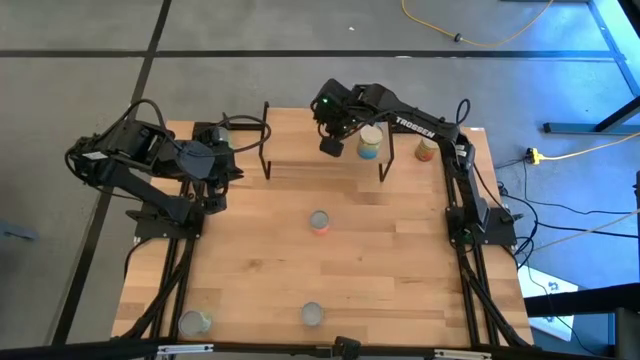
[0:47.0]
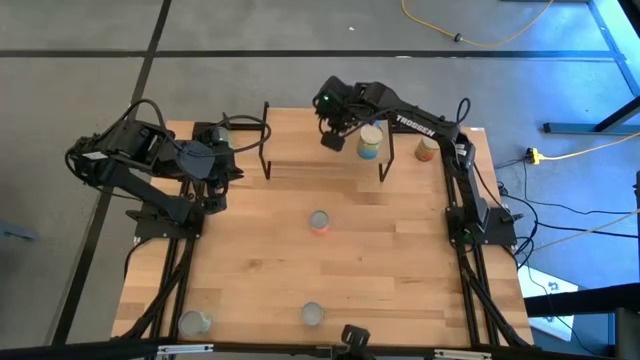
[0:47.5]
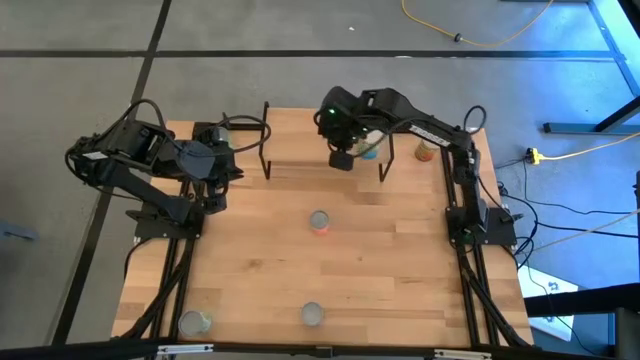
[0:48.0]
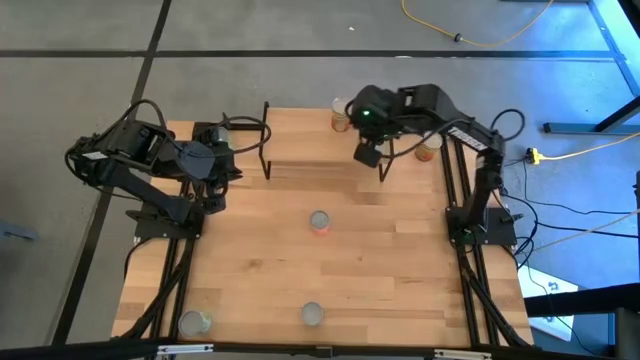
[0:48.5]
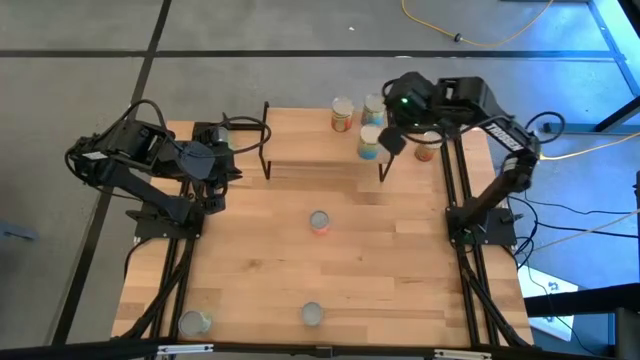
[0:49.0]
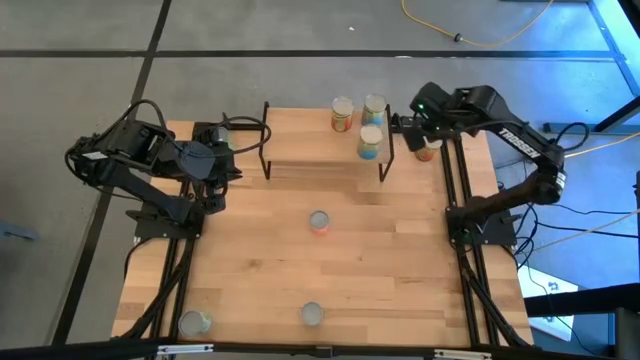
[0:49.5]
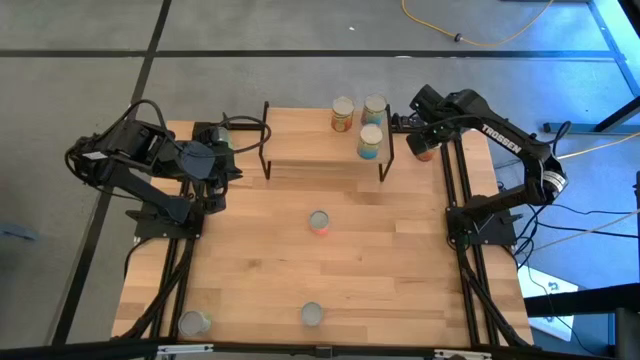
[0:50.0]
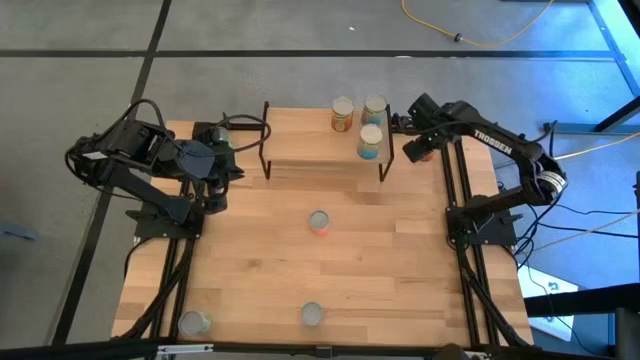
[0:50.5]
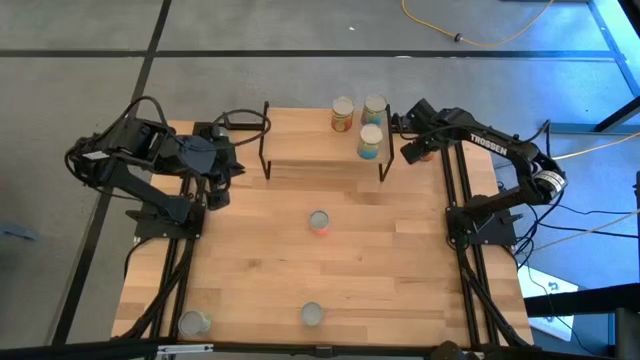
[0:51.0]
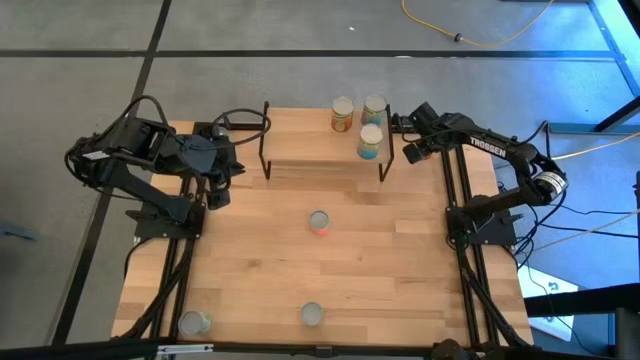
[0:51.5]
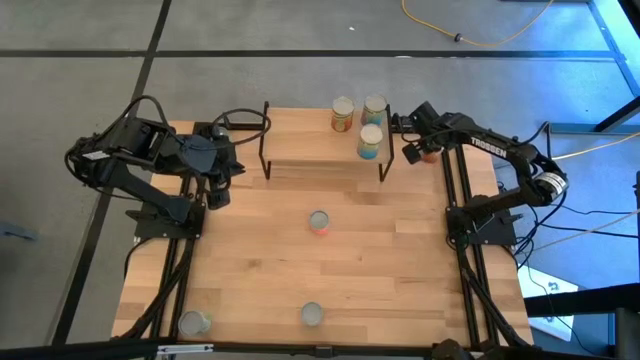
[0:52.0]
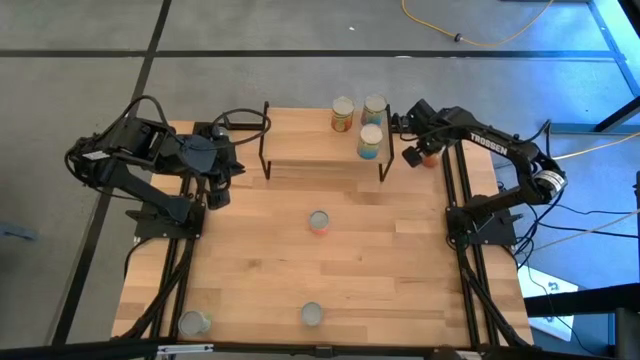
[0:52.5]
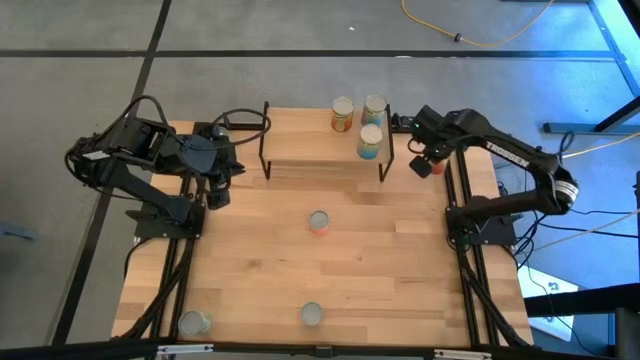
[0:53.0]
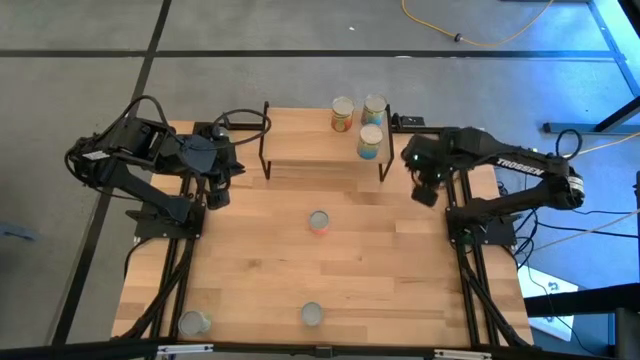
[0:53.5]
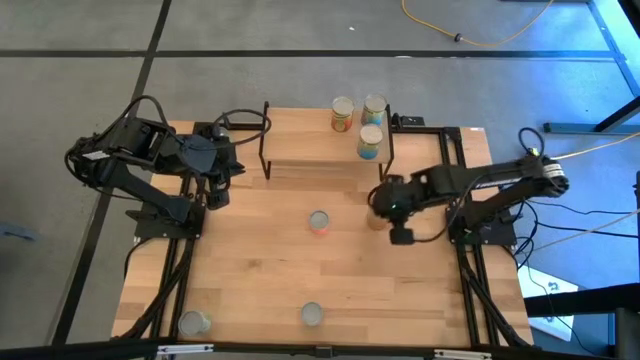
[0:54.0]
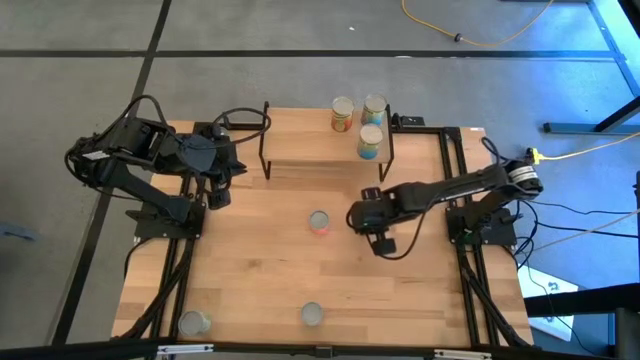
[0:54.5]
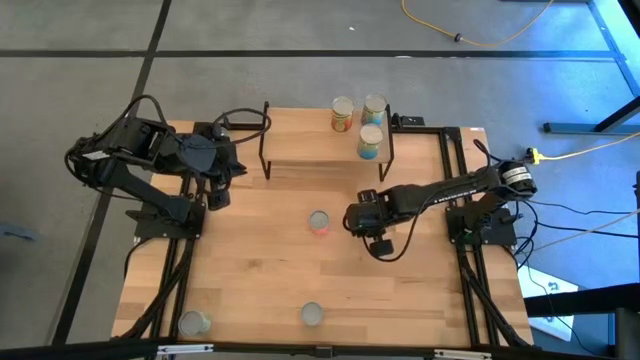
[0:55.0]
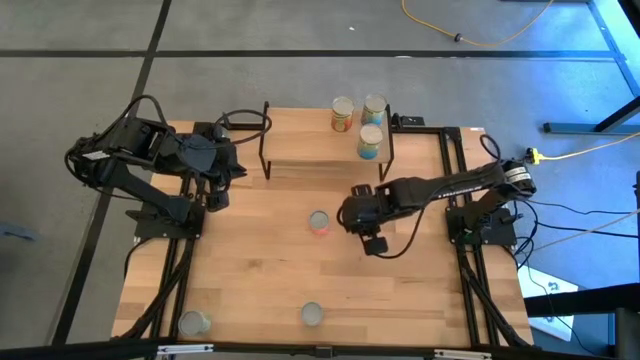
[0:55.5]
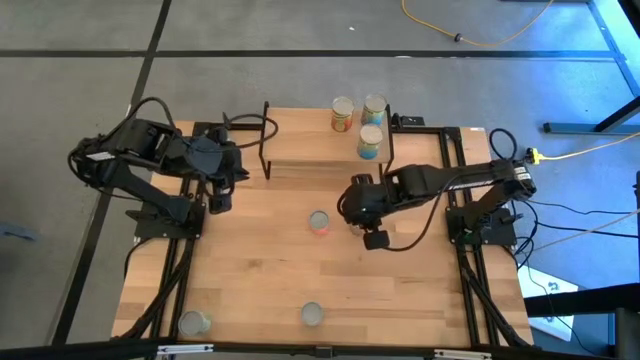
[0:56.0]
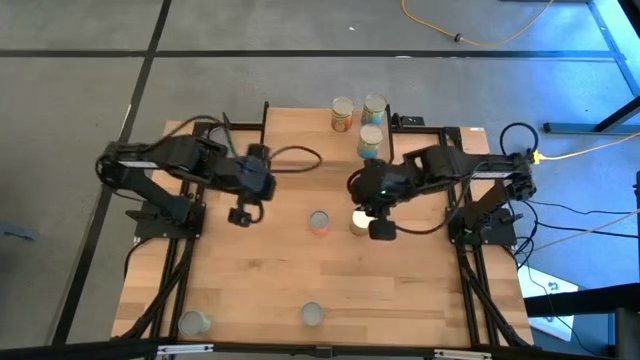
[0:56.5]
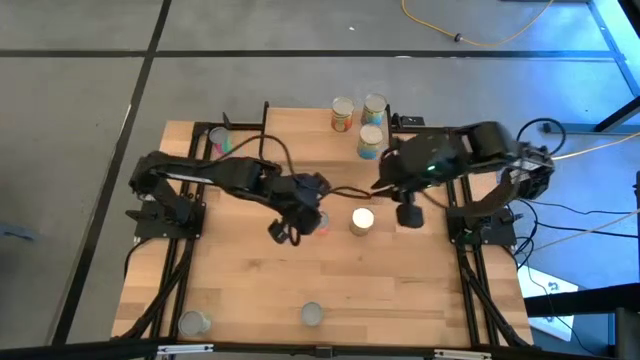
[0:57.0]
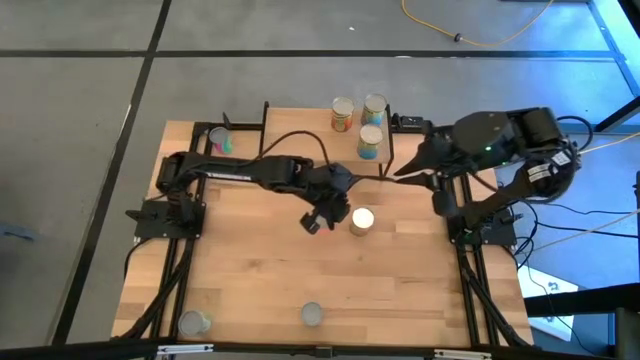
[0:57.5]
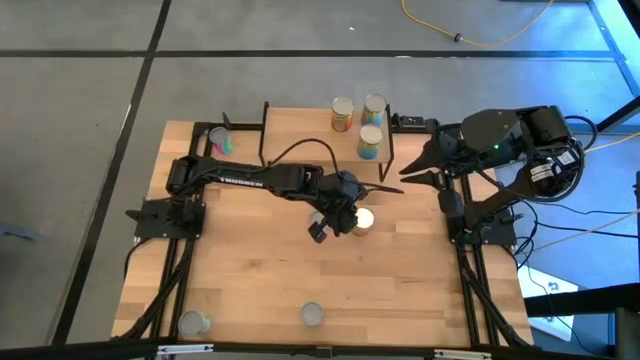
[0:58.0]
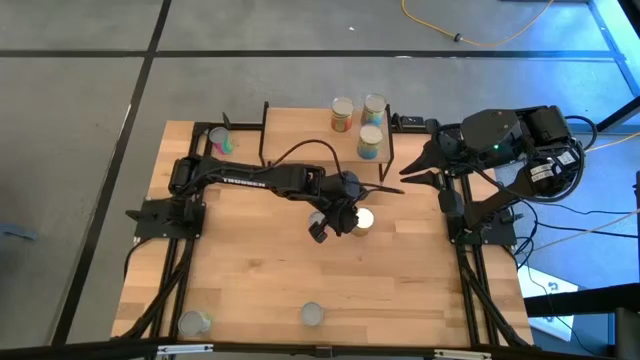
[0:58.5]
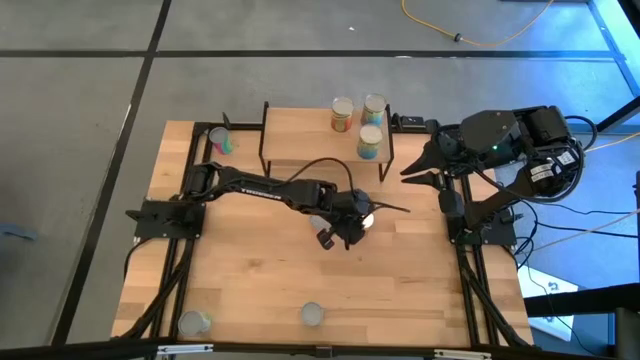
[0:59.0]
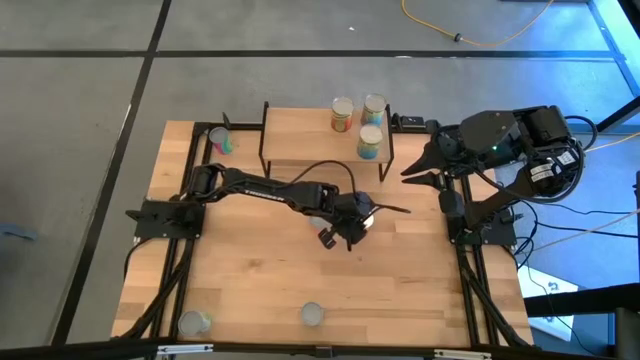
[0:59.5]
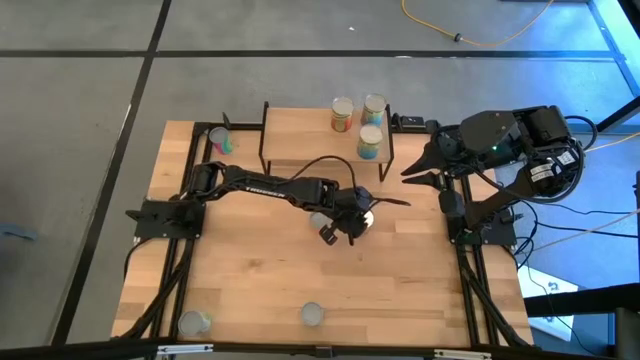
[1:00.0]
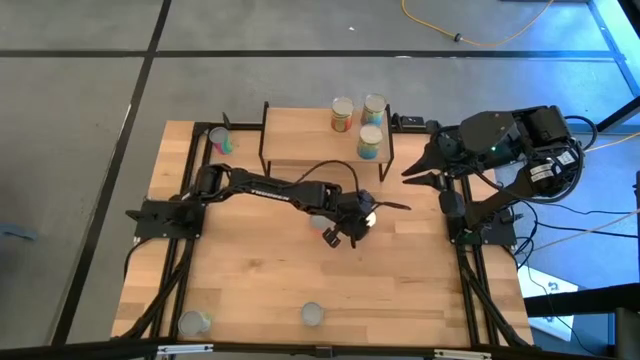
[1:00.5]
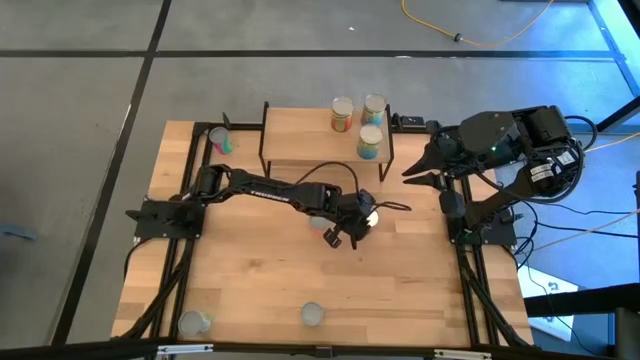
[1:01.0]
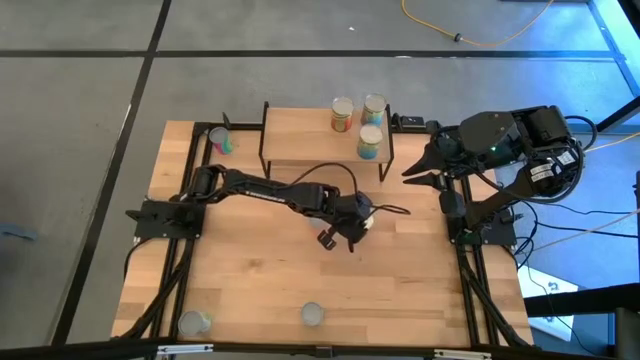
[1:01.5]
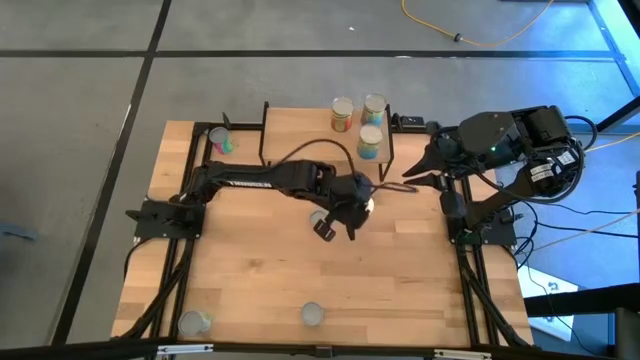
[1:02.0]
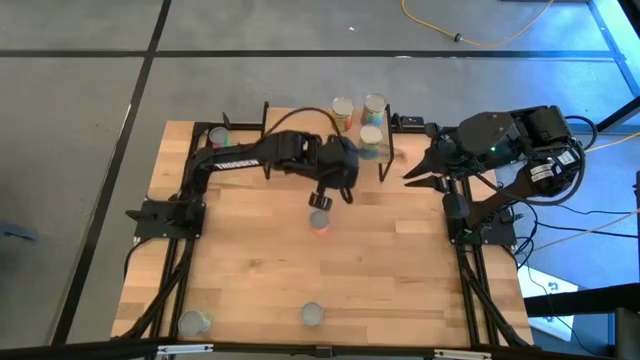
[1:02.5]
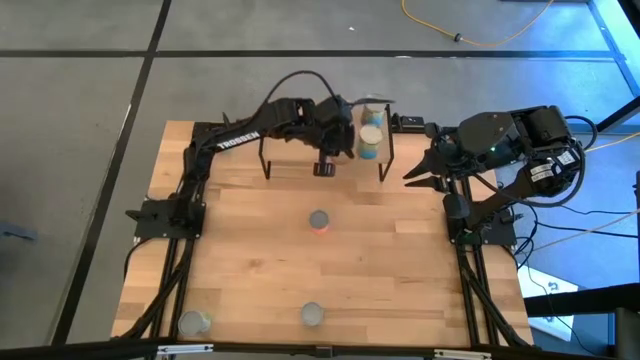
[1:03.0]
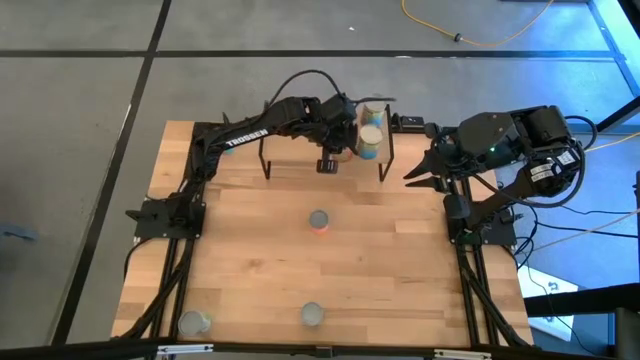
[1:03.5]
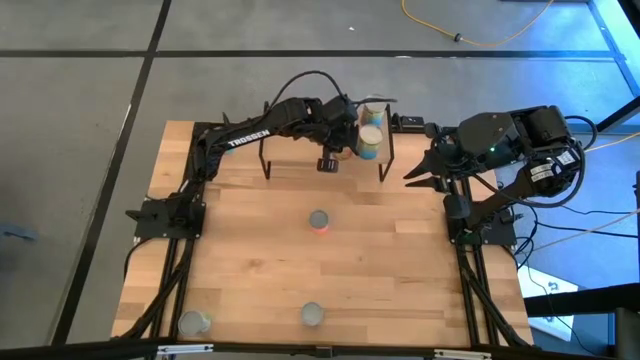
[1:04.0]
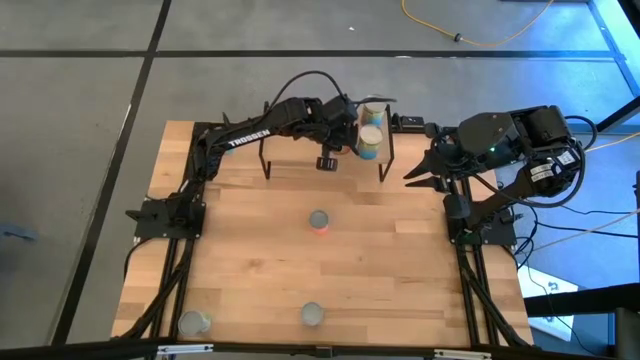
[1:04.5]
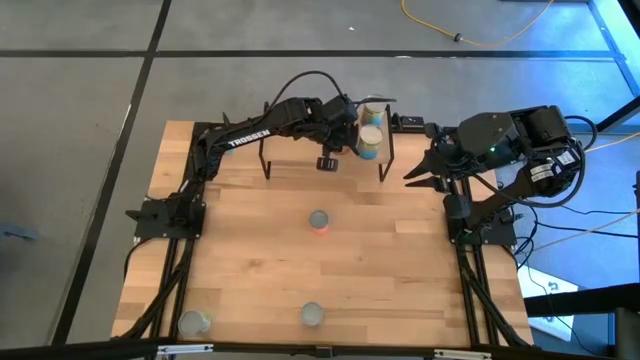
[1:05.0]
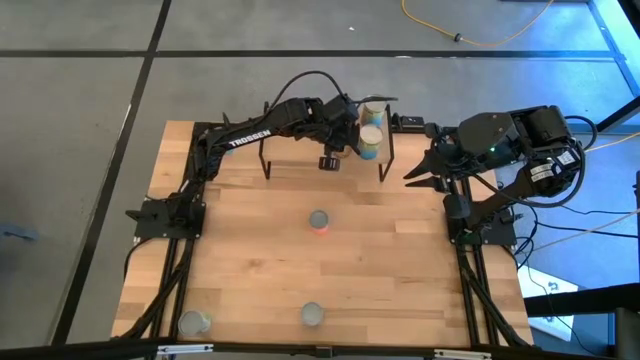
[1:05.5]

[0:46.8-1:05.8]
Task: Pick and place cans onto a shelf
Put the canned green beans on the shelf

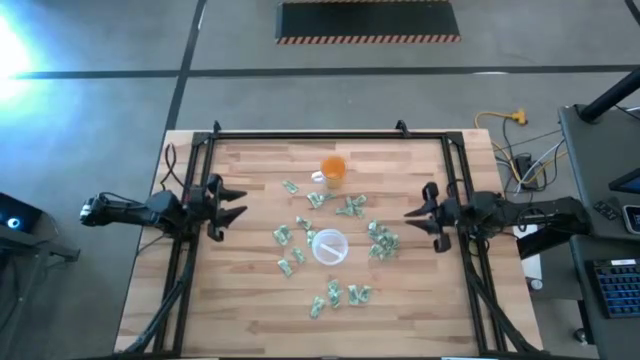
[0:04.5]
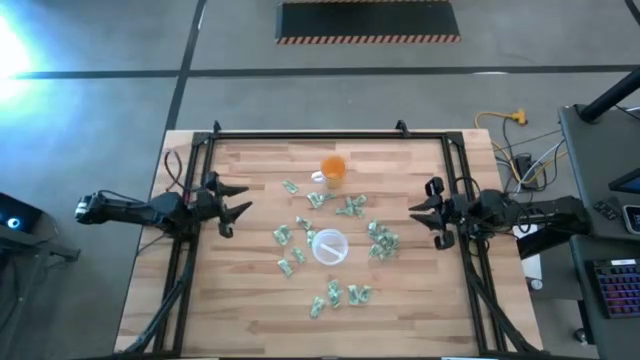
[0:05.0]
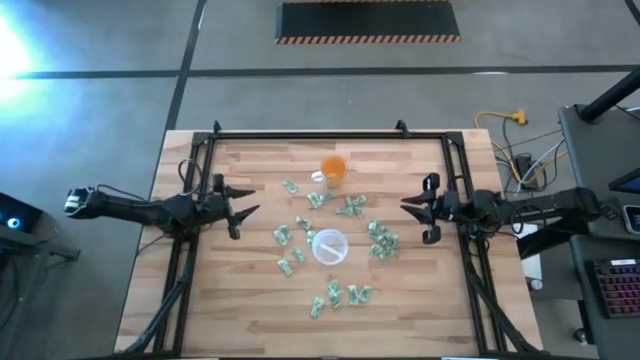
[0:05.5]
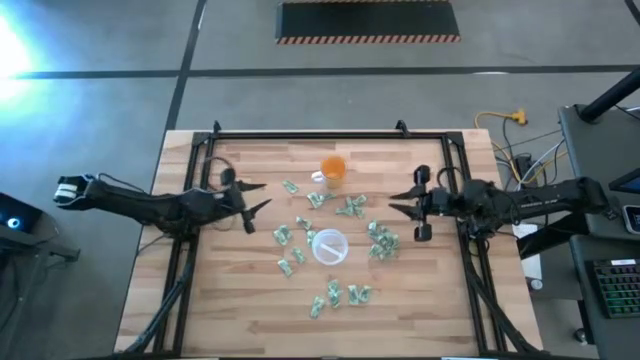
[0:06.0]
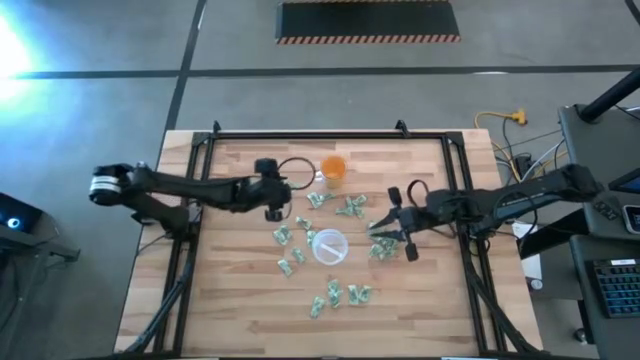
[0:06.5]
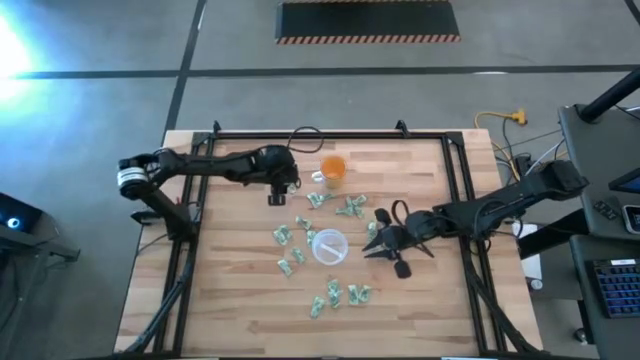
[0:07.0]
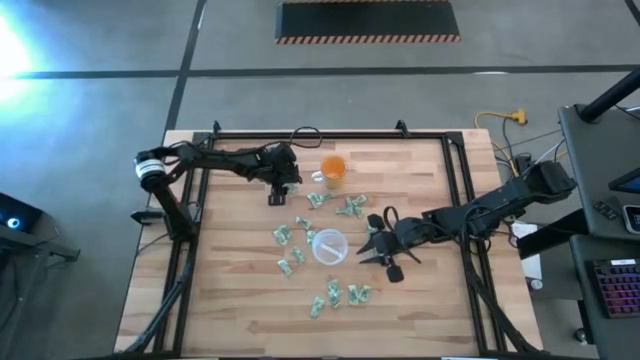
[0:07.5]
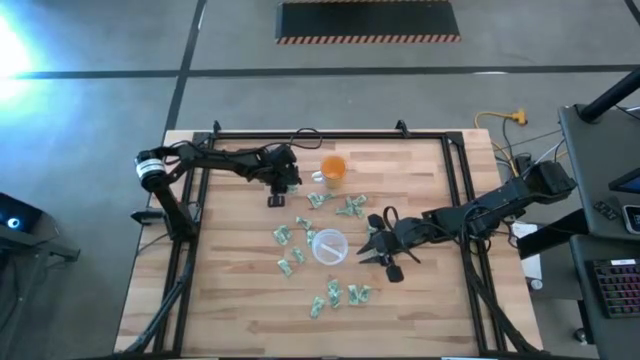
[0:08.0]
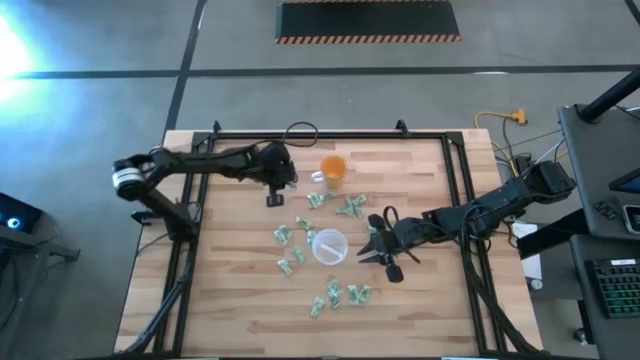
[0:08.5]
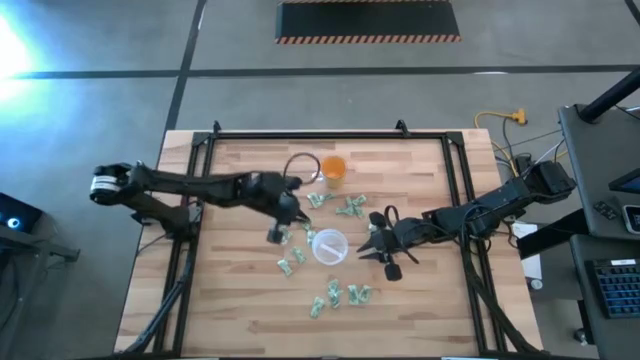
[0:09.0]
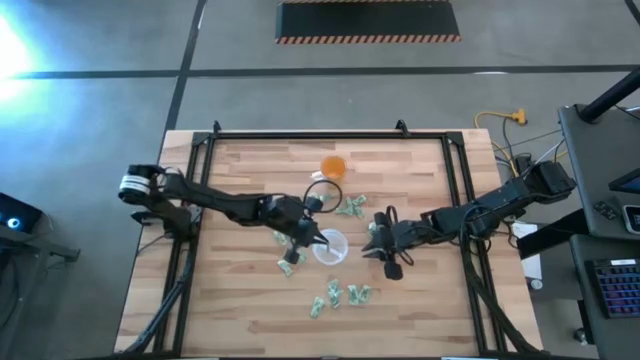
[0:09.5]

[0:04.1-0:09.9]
Task: Pick and place Stevia / Truvia into bins
Put the green stevia packet into the transparent container
